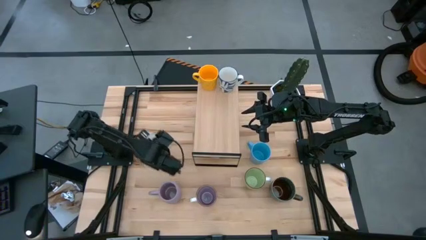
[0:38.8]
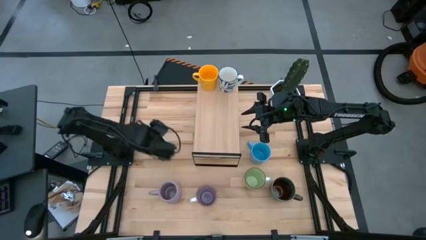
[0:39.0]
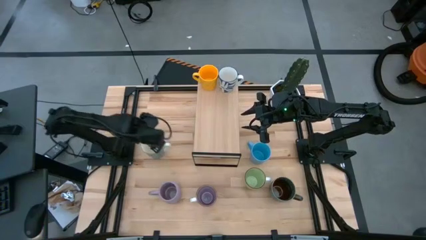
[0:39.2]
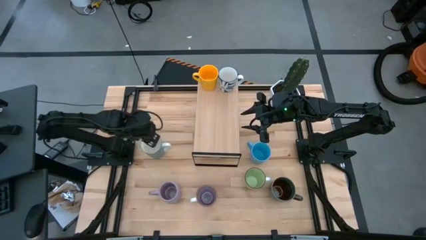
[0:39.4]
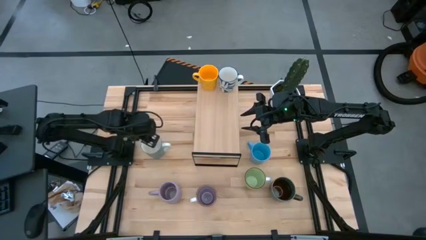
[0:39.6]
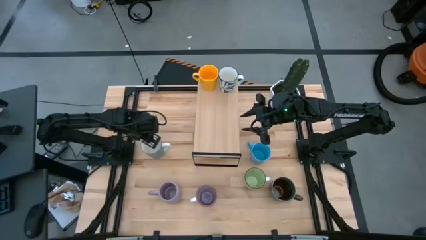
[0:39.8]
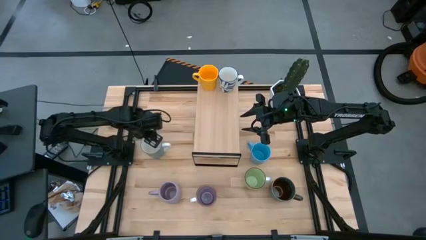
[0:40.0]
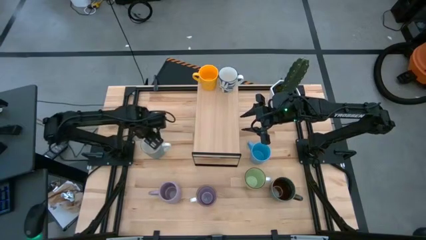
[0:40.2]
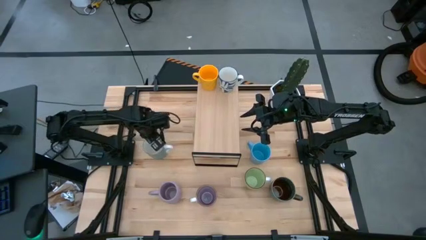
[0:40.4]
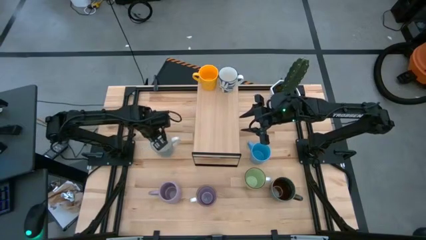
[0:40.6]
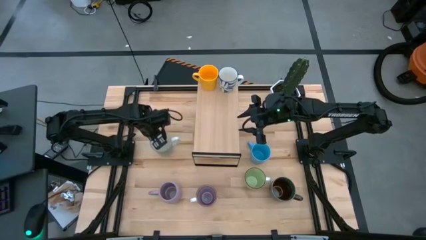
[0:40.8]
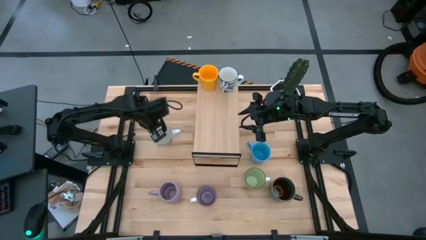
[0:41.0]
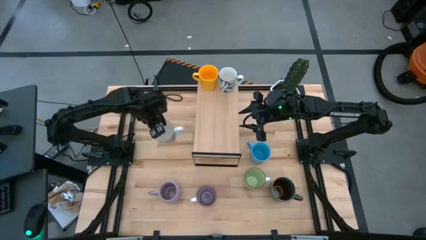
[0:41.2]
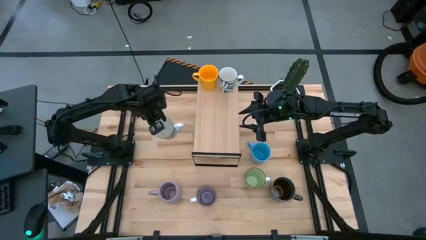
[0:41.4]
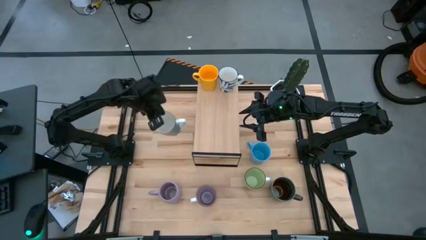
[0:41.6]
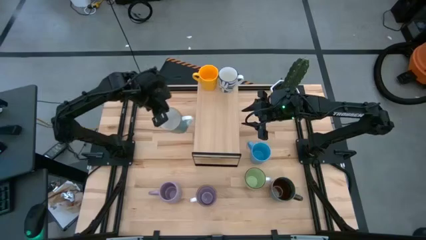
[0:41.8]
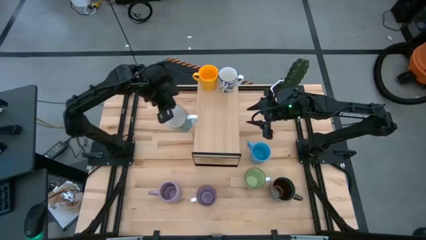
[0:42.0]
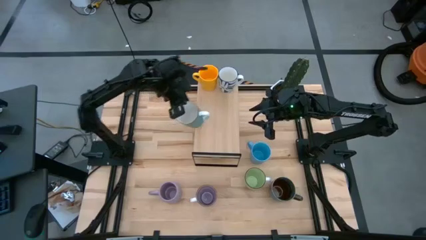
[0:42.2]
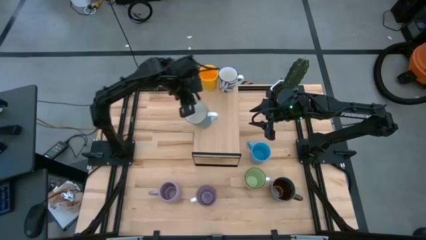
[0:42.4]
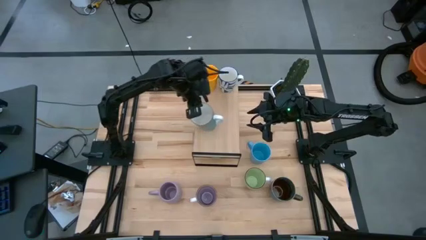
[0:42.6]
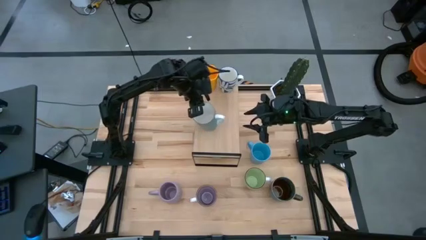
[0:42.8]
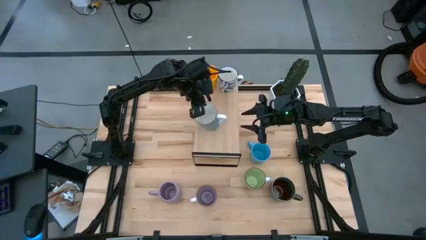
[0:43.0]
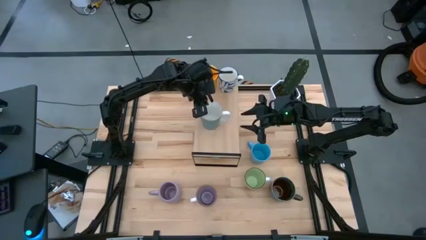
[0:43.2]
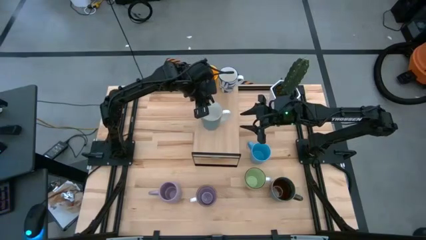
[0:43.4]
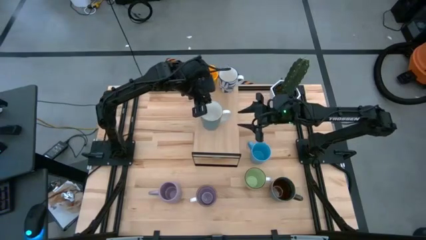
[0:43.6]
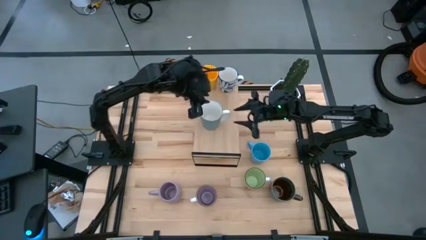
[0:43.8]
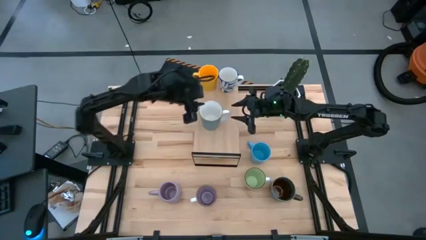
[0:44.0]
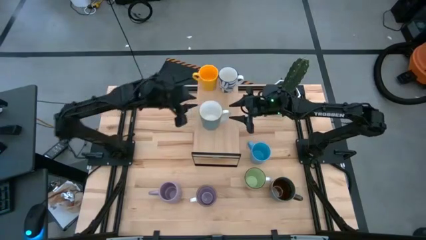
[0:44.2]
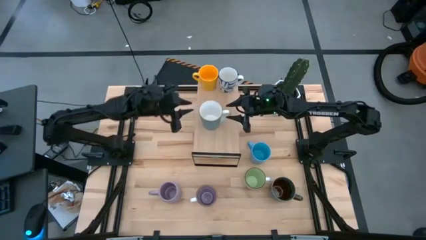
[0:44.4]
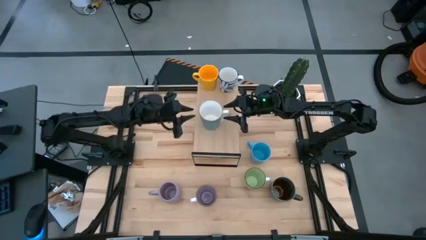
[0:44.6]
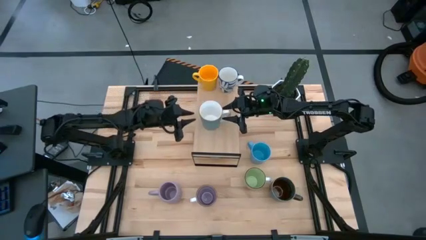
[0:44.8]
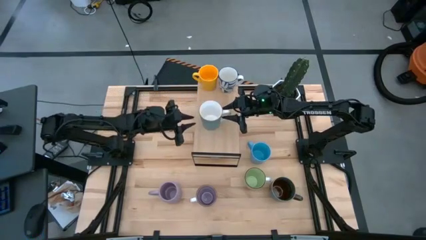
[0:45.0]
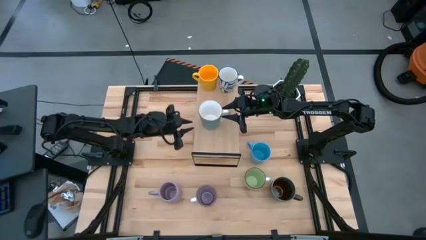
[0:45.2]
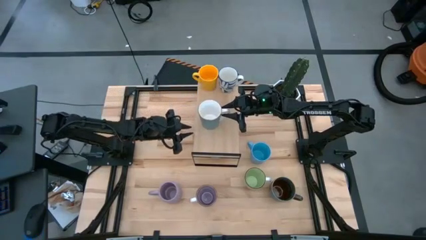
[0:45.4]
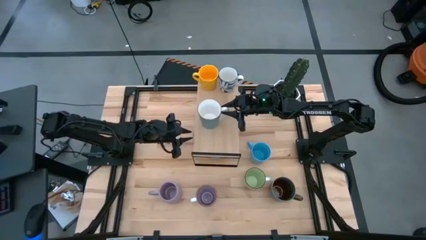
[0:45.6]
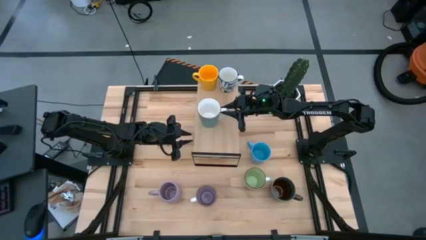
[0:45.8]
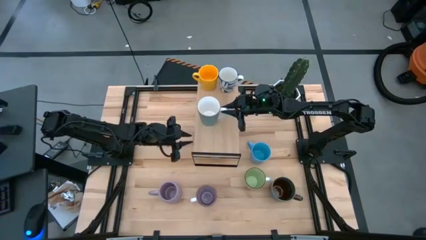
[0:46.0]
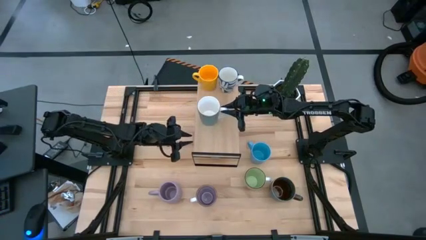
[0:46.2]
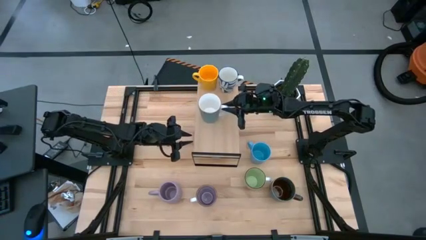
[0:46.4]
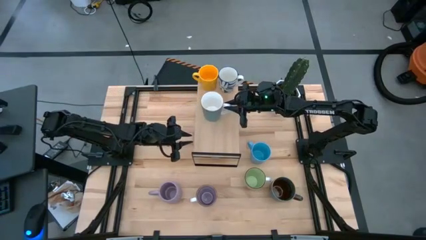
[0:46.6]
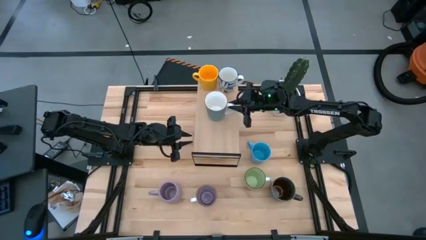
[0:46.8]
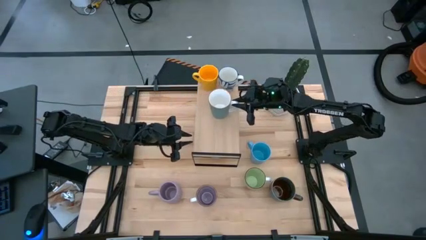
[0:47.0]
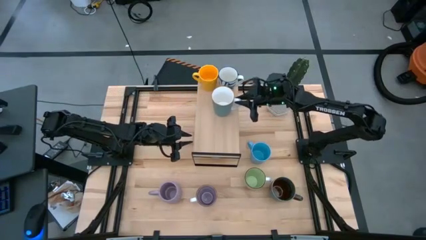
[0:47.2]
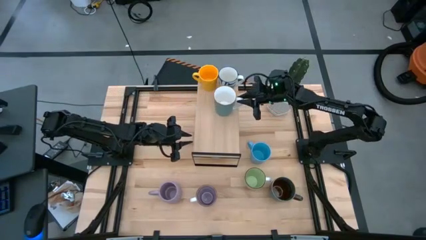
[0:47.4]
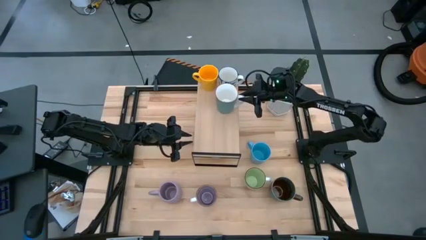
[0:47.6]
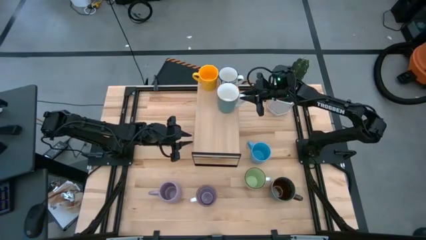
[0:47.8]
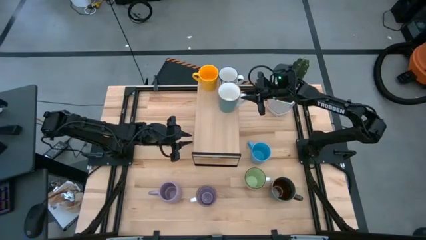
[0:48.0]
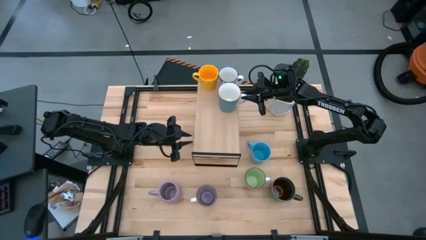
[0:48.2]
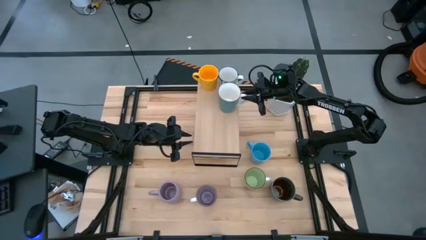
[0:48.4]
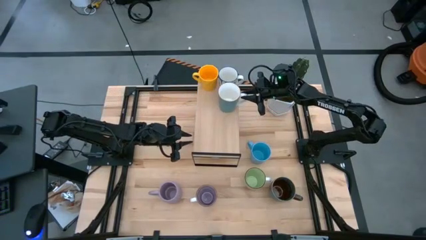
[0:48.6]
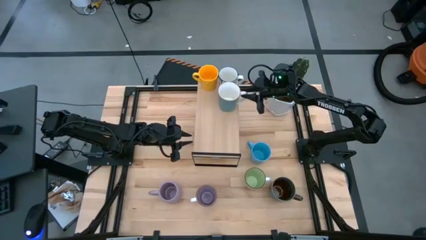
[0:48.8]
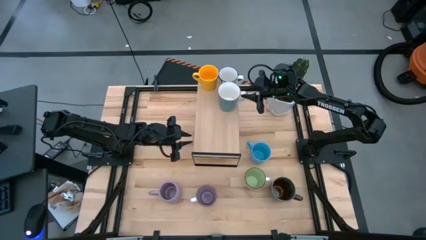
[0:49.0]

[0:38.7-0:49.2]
Task: Place coffee mugs
Put the left light blue mug on the shelf aligned with the blue mug
